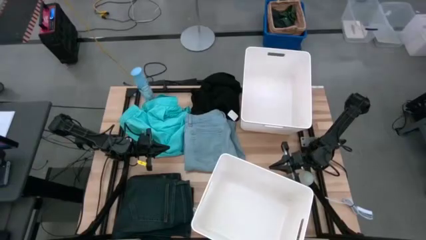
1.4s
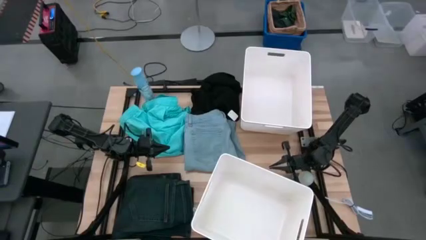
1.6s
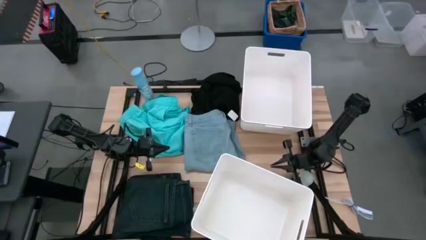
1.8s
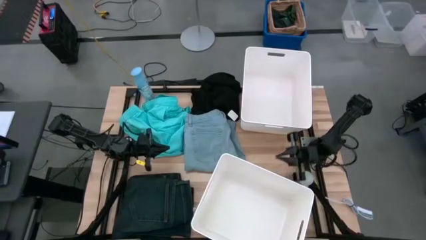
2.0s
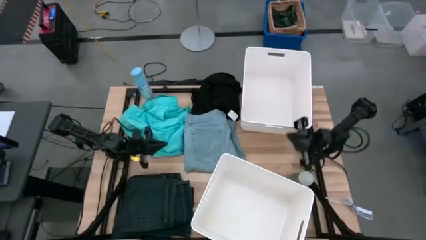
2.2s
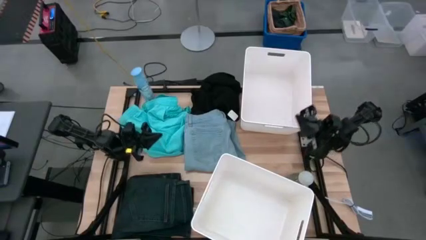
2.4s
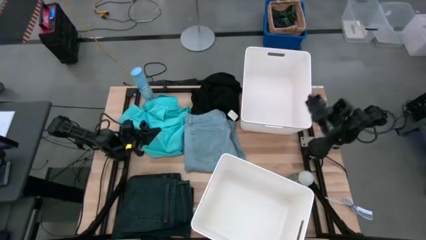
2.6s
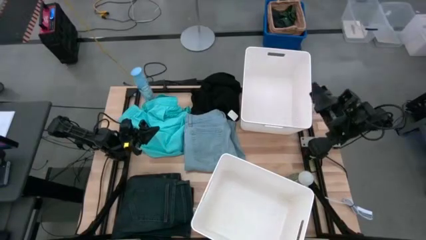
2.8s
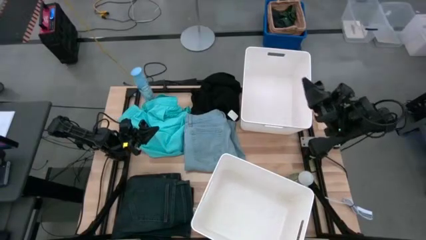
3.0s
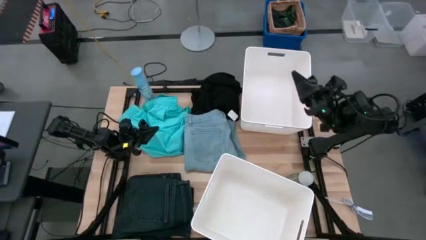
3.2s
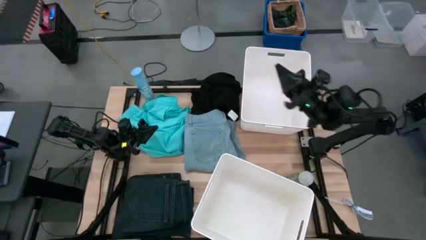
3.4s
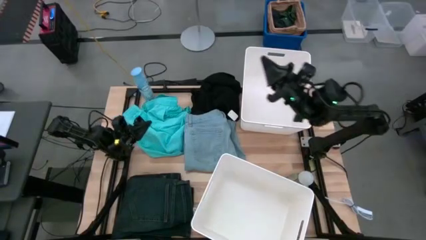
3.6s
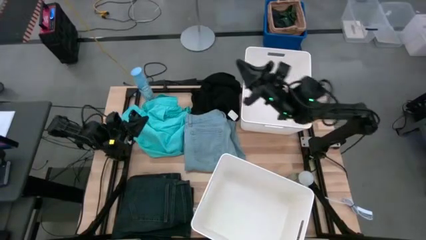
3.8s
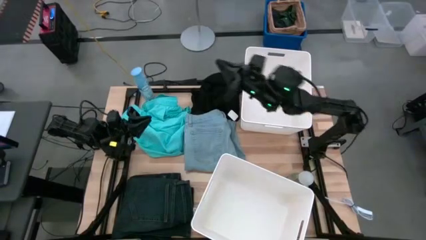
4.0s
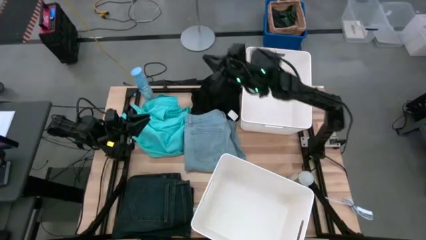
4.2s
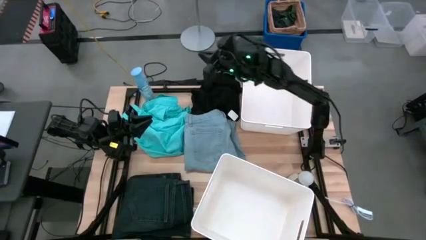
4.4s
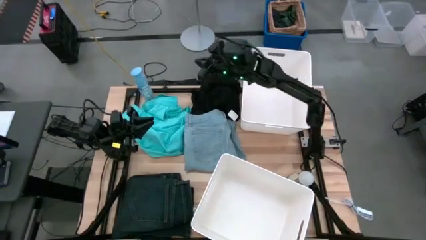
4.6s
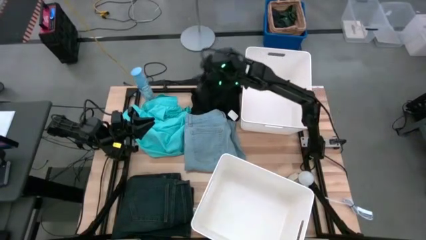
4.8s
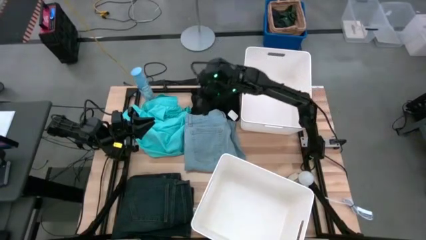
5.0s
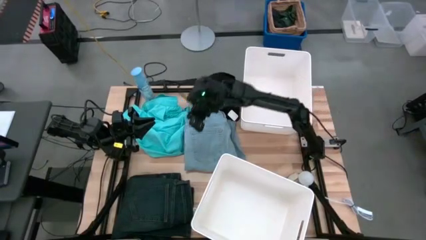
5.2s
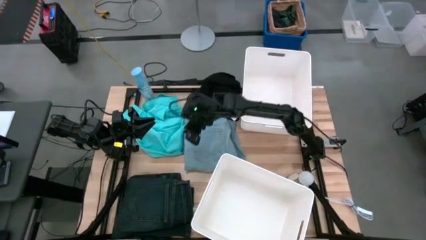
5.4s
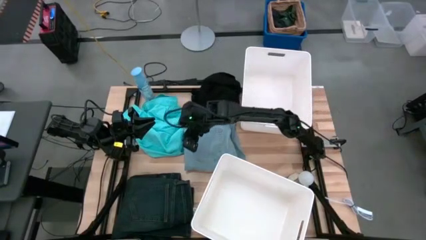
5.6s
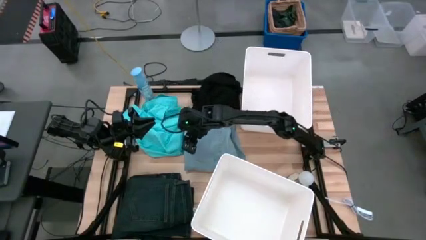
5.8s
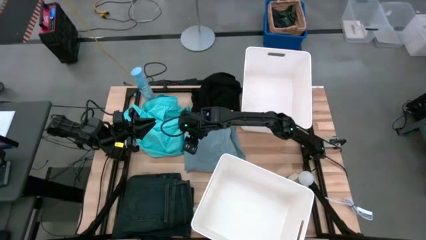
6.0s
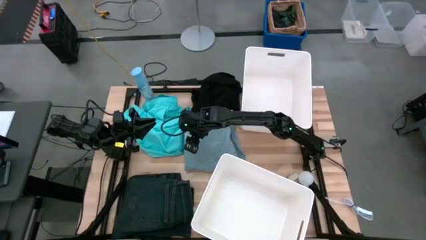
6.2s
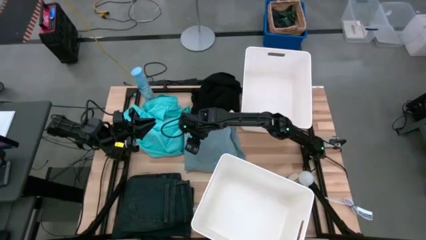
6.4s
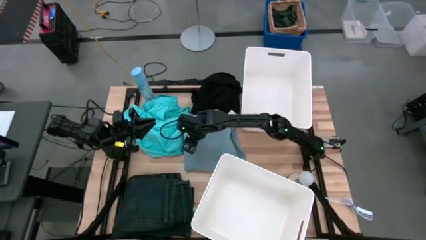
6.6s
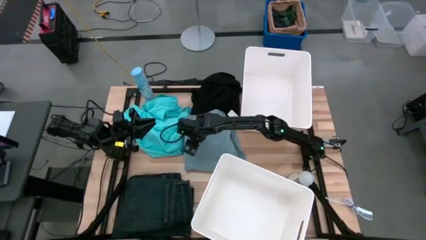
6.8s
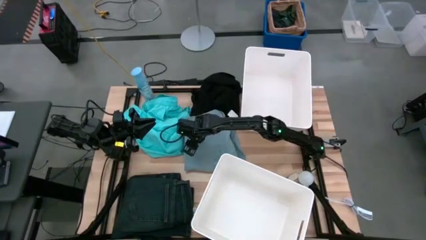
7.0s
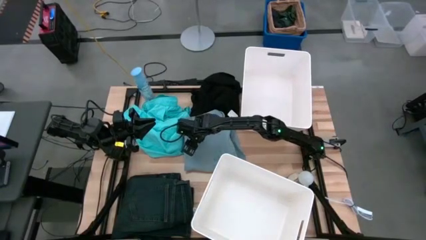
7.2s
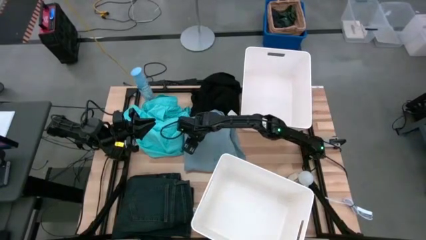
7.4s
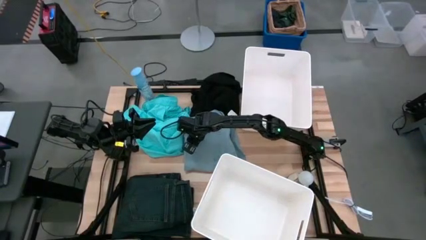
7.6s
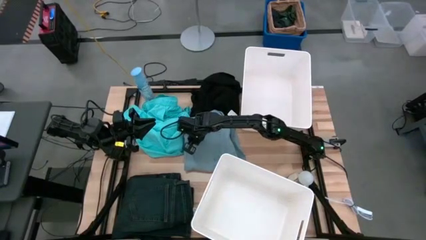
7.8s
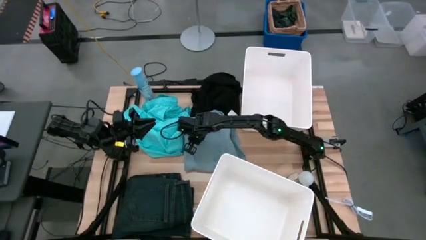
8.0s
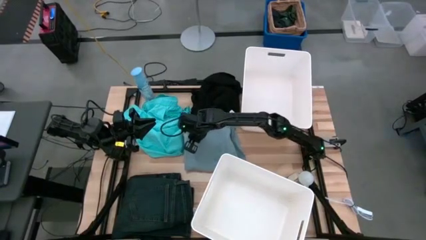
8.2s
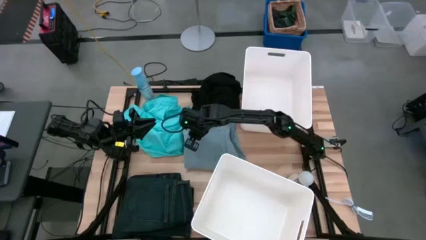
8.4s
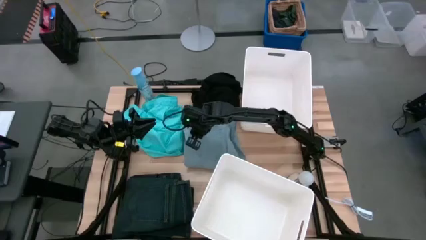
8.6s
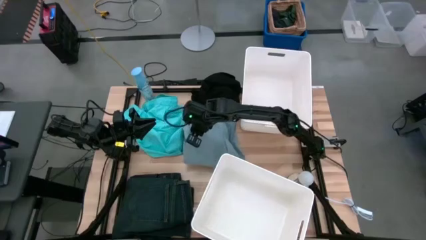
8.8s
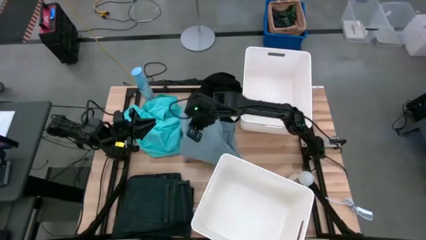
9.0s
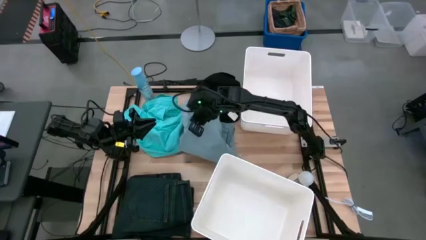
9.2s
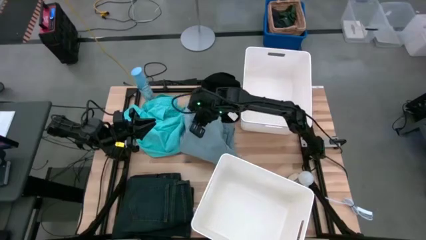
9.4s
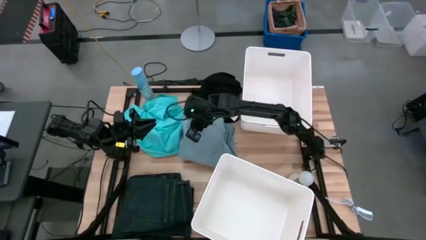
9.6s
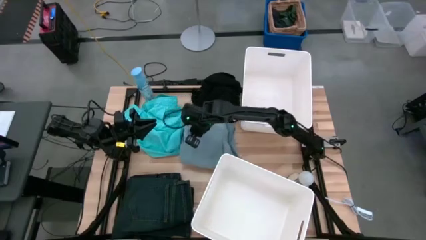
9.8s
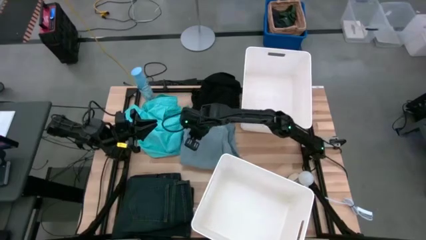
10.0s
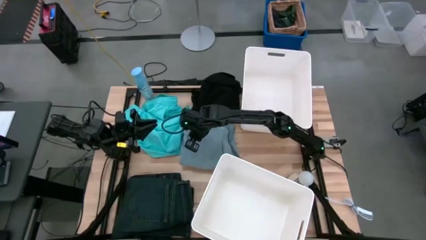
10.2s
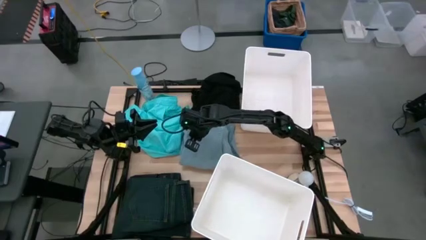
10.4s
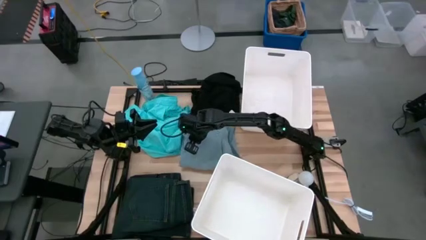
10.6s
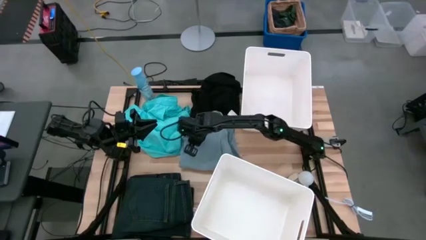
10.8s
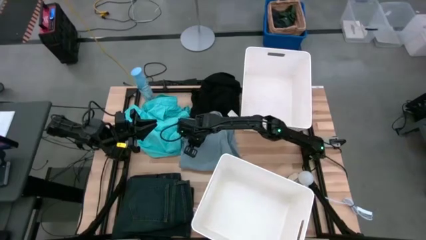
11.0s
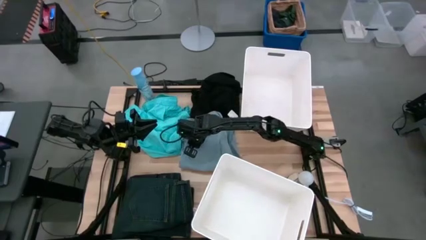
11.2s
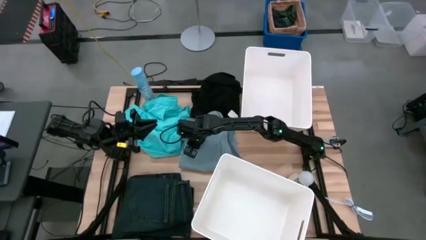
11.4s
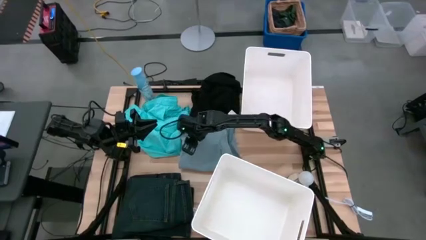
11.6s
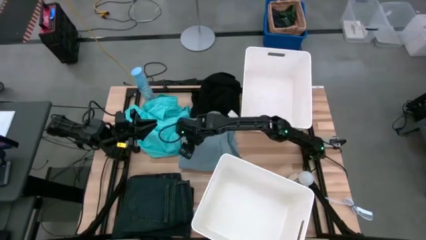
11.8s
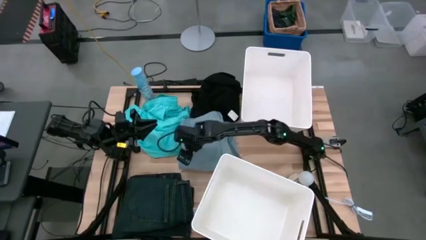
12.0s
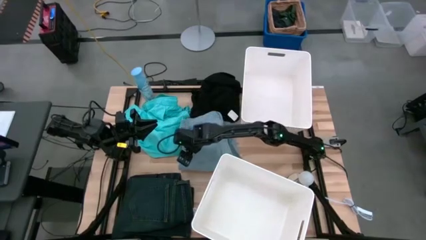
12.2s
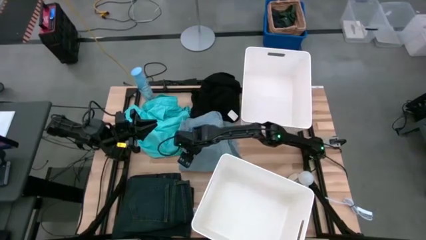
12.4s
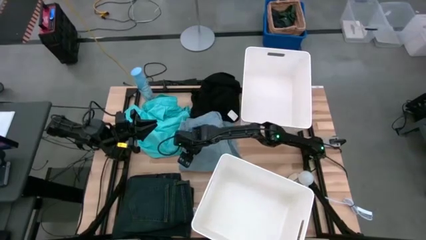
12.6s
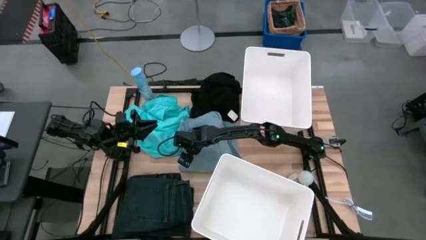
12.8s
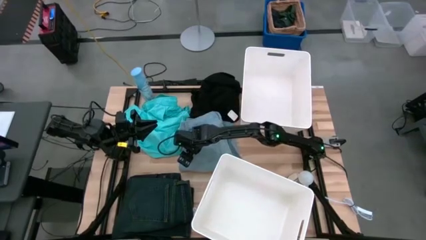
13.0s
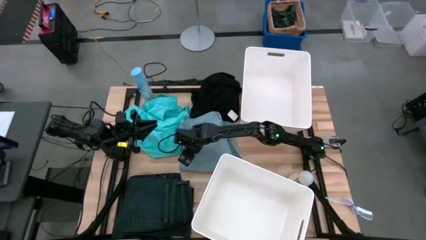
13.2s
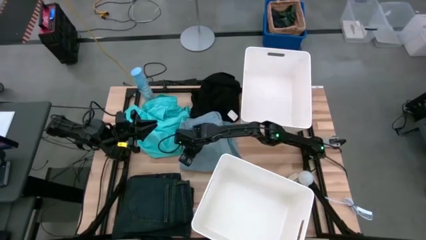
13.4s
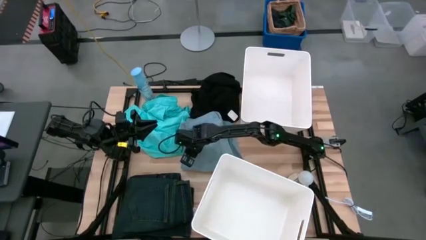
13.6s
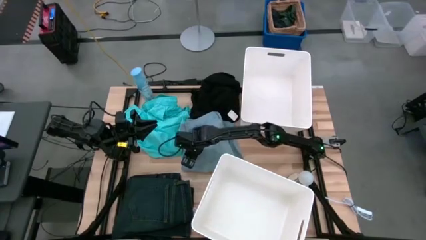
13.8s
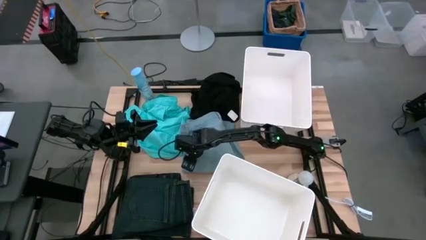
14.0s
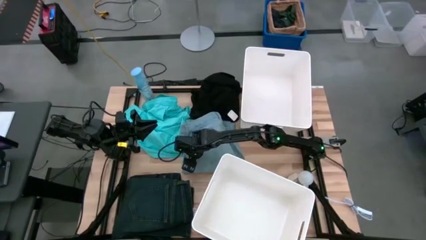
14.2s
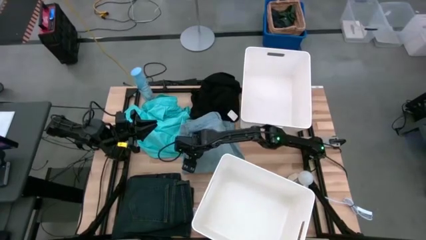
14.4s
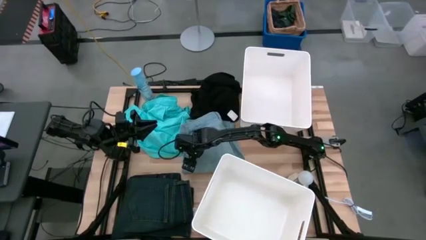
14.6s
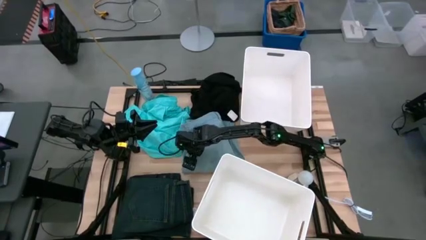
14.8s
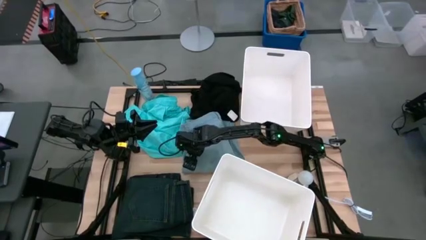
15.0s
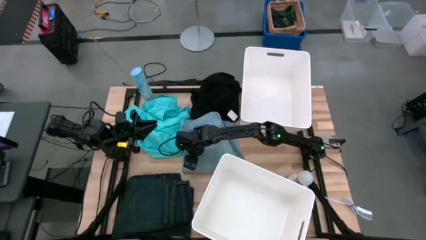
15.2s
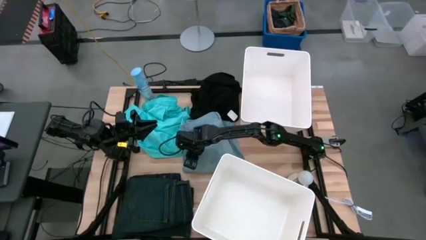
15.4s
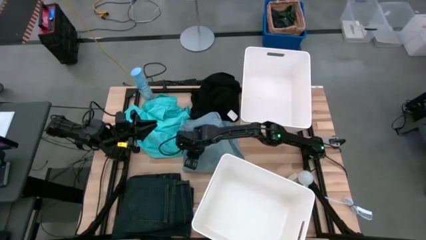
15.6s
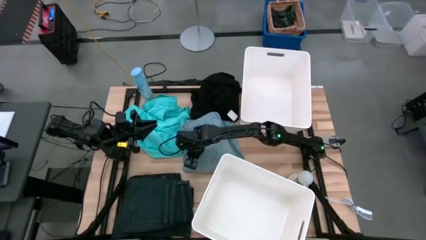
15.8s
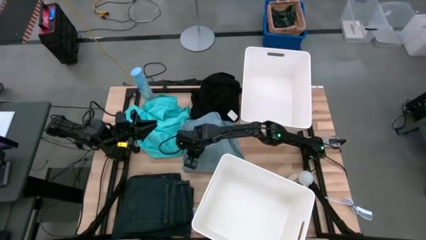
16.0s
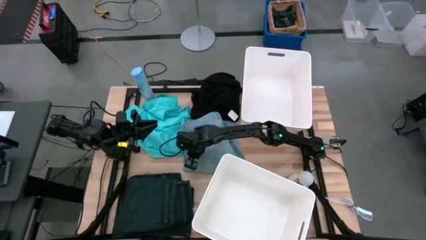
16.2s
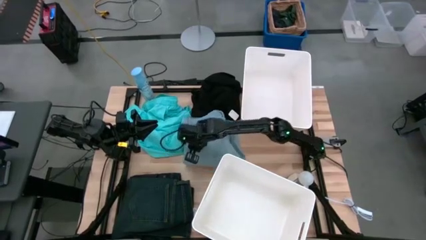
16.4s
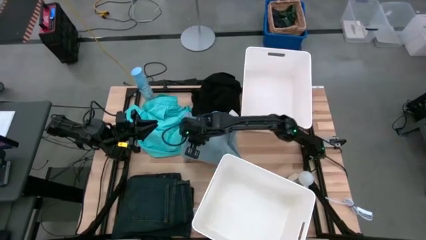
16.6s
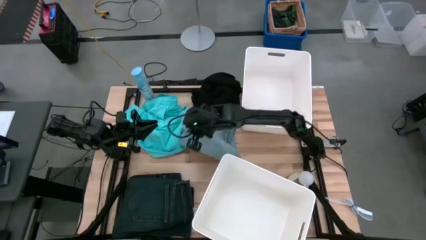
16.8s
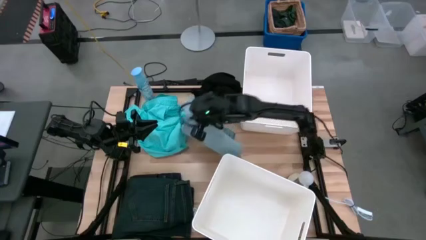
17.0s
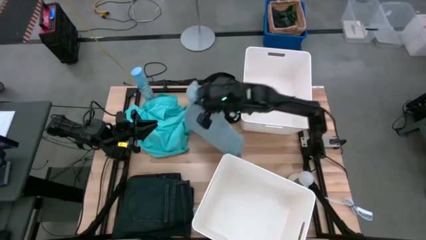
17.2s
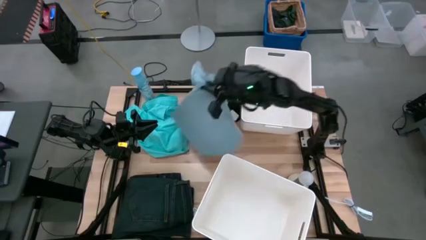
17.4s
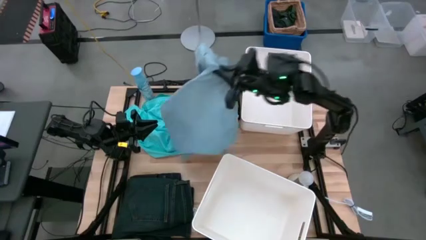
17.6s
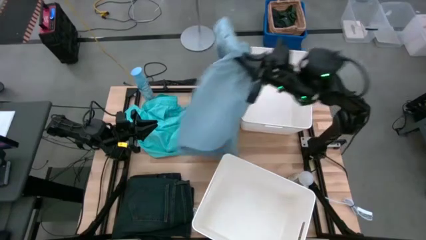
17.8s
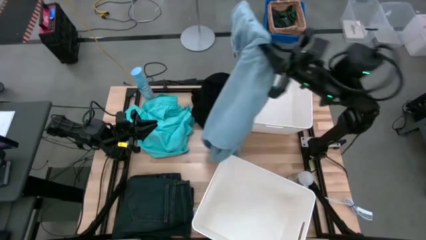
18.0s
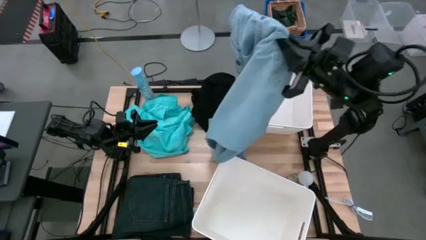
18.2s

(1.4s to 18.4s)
Task: Sort clothes
Put the light blue pants into the top white laundry bin
